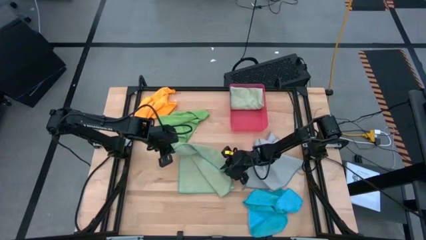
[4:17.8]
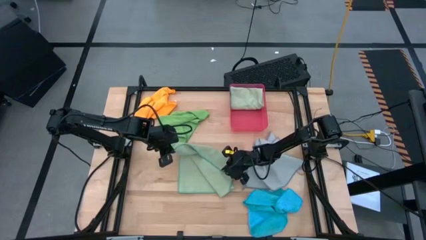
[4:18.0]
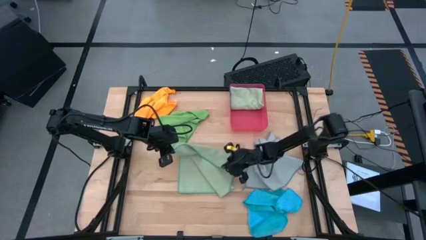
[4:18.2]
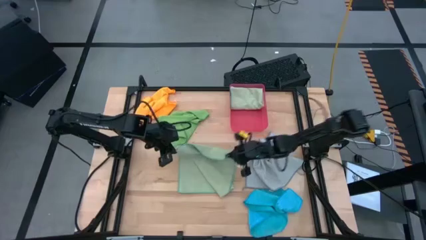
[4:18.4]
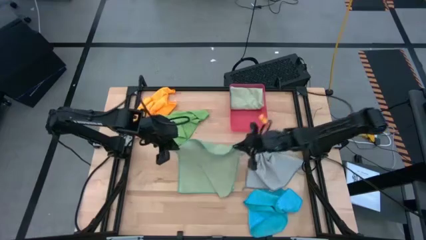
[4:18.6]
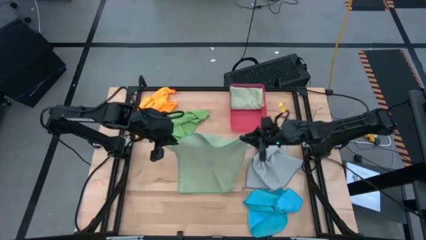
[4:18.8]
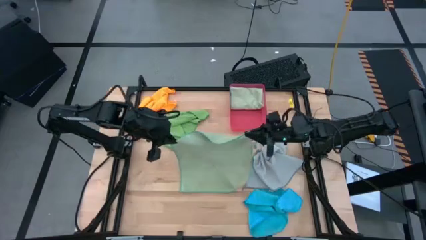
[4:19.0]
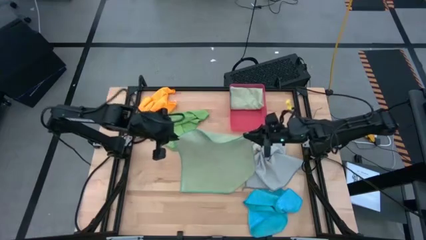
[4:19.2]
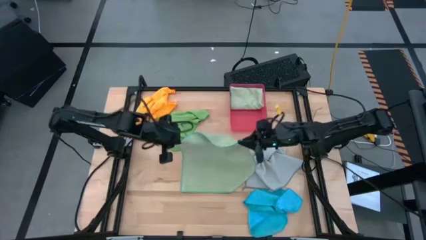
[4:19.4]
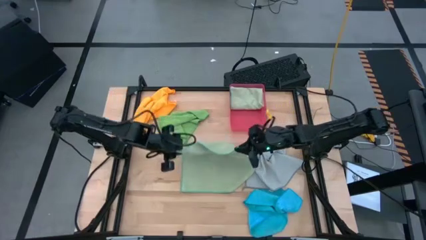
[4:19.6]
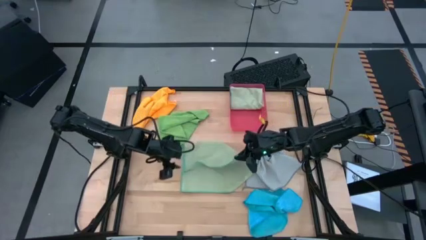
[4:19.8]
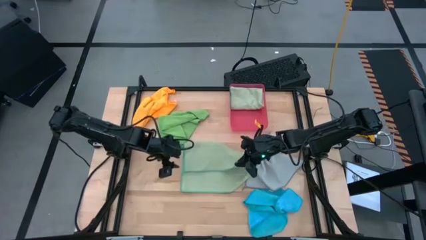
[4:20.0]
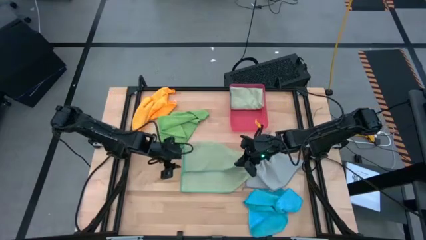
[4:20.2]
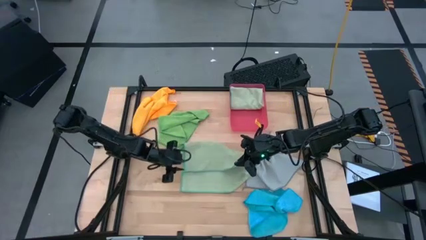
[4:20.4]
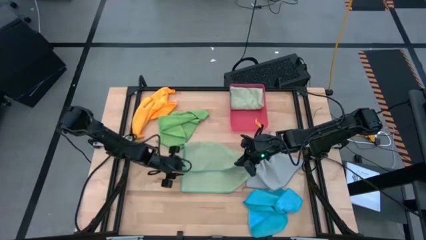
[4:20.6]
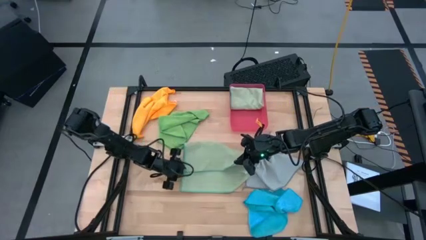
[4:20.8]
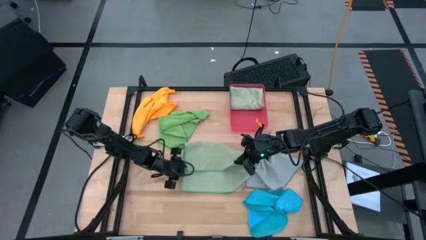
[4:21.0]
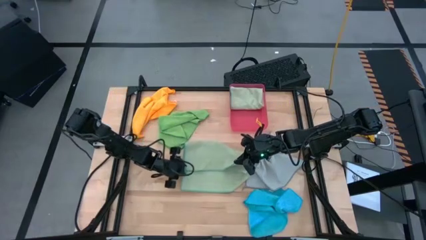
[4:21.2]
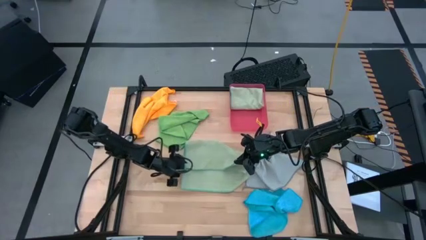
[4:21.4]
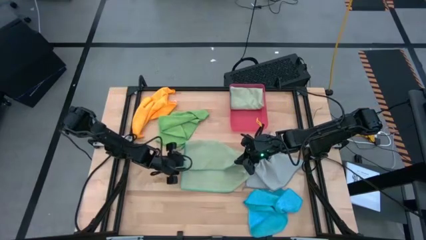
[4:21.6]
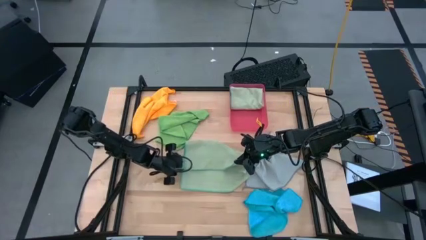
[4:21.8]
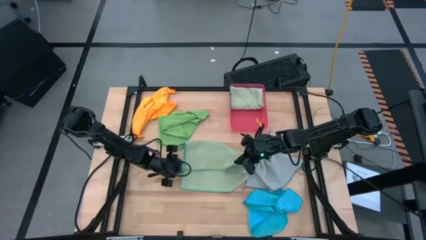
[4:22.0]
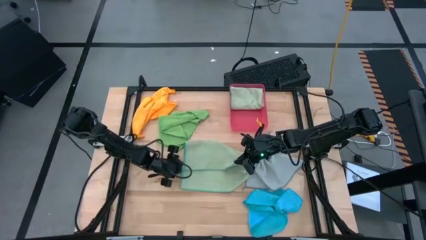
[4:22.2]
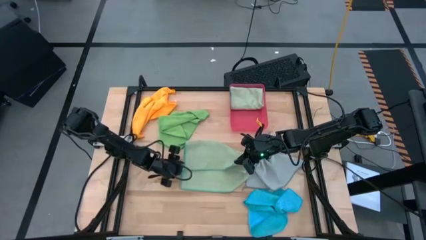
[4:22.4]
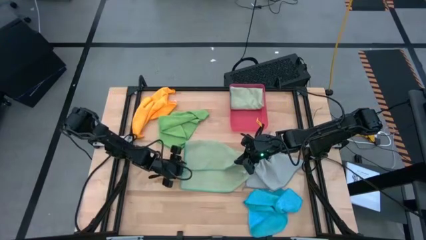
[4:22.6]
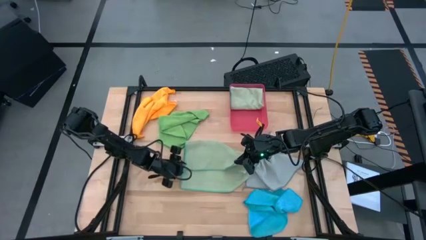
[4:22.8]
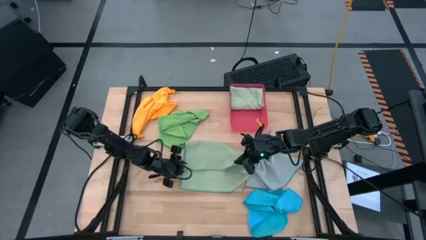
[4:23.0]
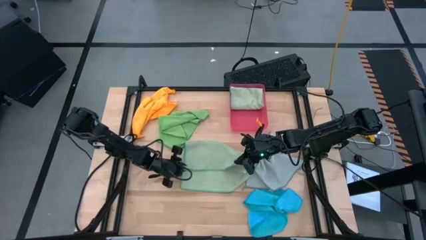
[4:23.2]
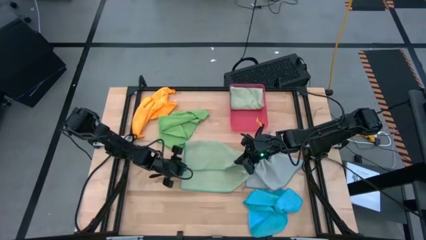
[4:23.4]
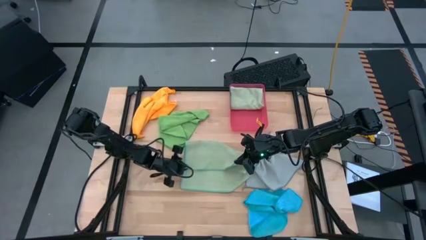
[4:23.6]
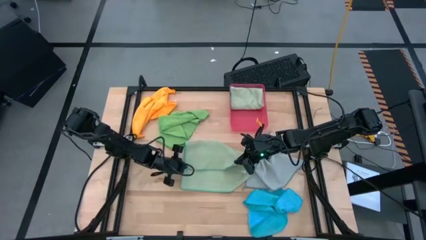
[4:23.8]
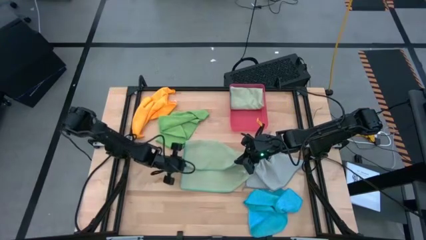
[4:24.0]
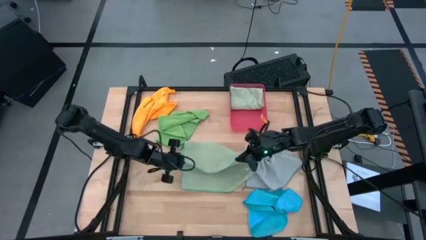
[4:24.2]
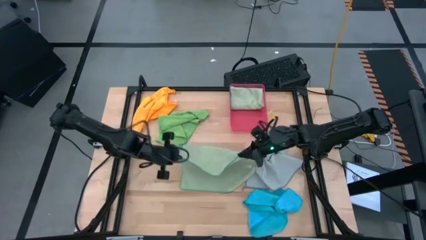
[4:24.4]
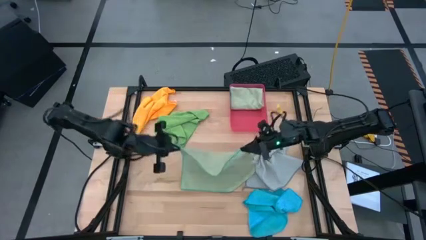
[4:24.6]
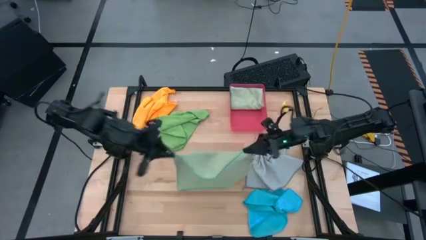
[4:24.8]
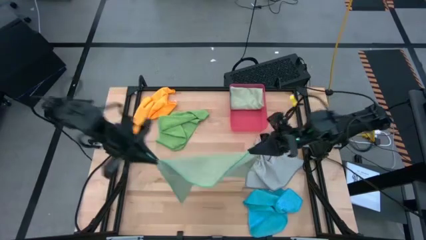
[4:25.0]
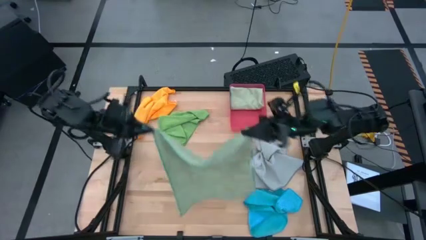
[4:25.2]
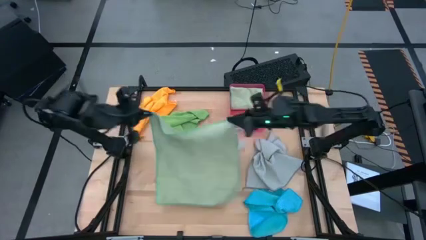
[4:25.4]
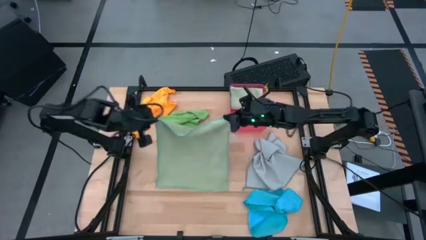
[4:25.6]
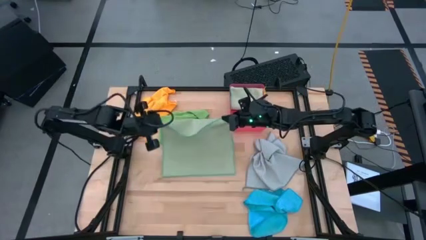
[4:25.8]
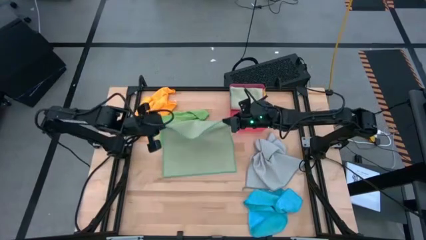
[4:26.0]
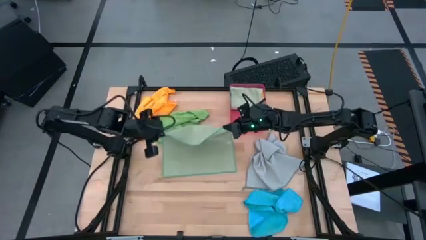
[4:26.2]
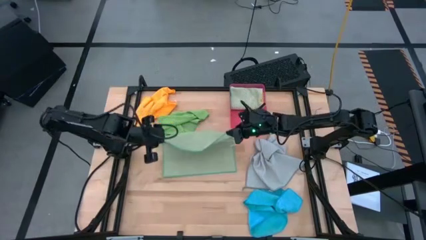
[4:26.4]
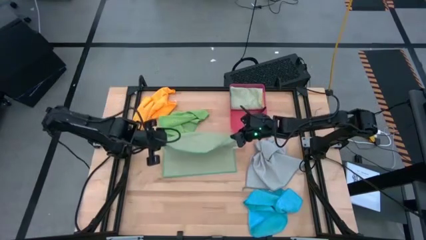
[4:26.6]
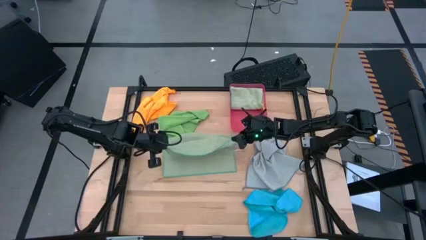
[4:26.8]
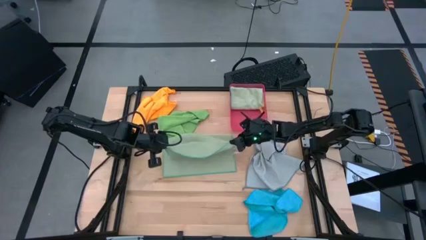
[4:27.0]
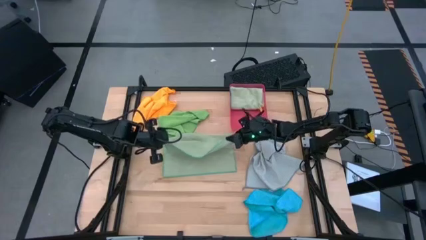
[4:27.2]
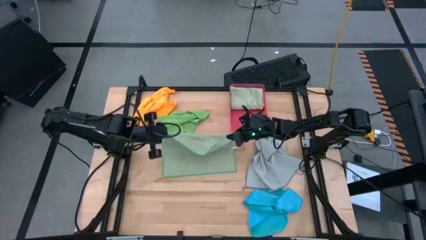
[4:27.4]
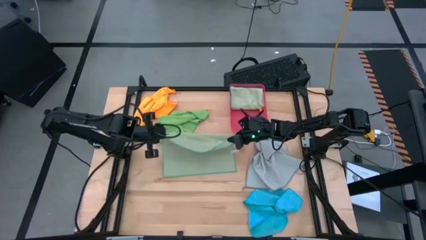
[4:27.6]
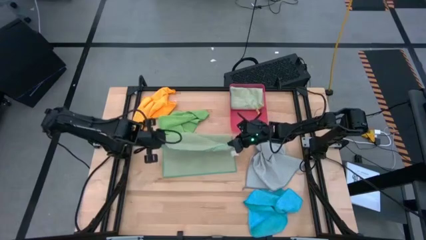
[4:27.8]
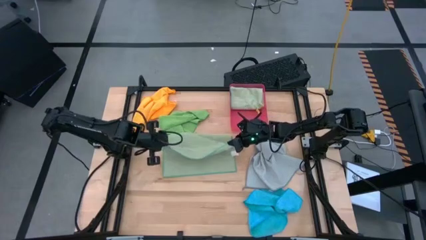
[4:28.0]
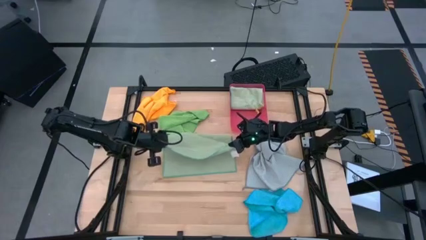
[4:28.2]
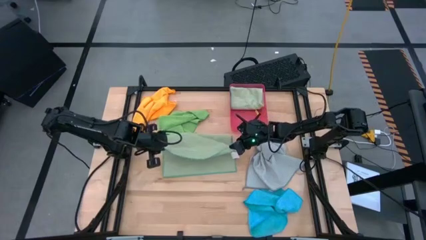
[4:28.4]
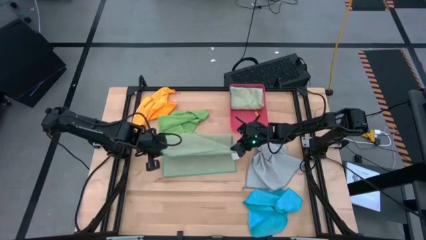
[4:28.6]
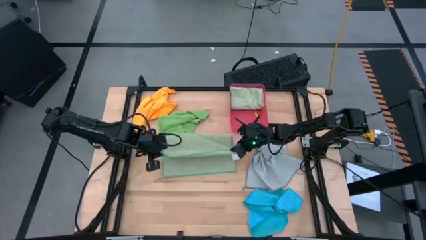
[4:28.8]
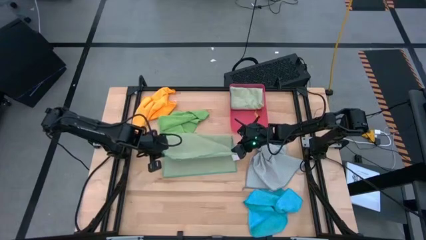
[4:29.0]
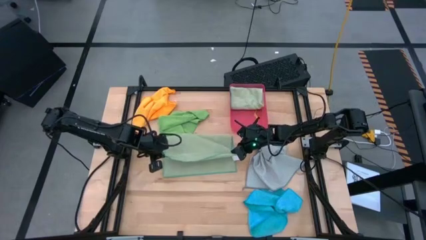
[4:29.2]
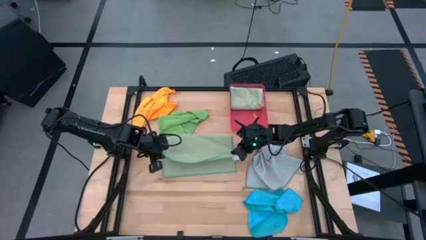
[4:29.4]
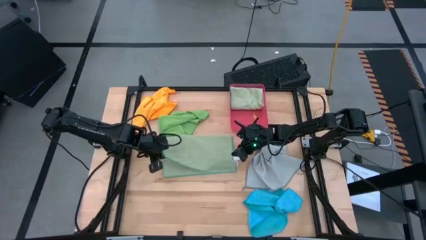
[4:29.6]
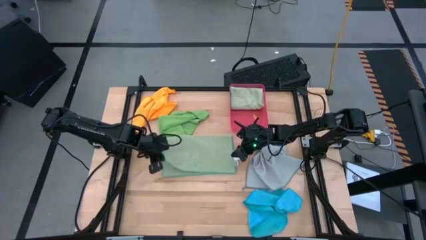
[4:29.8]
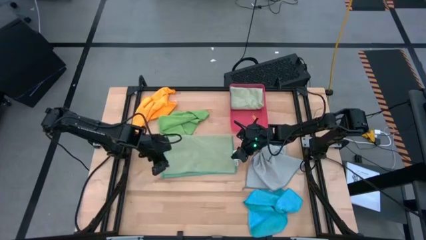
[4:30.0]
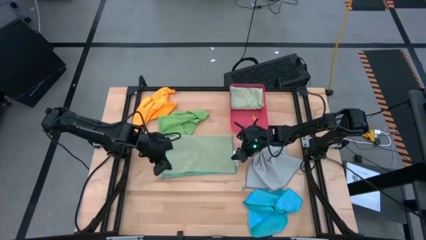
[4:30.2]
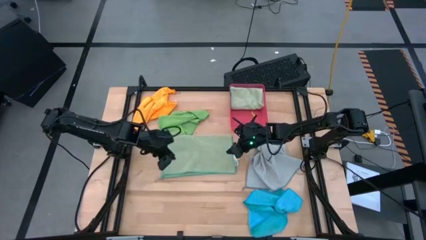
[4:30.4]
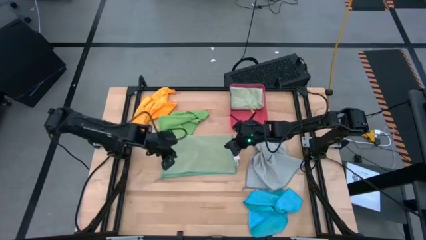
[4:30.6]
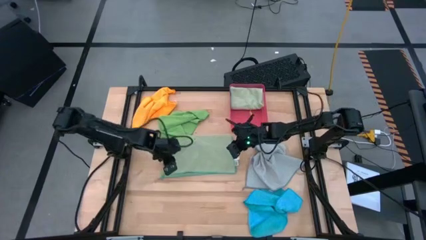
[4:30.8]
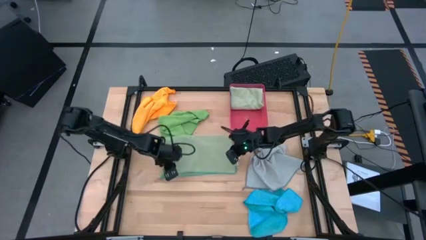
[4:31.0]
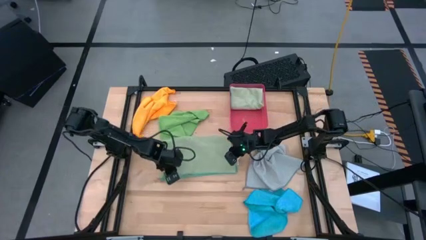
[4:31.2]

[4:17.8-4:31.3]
Task: Fold microfiber towels
Fold the light green microfiber cloth

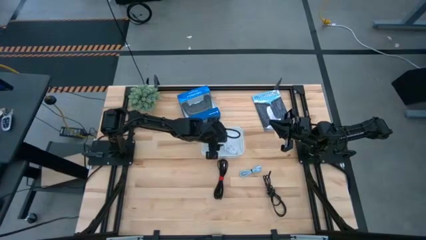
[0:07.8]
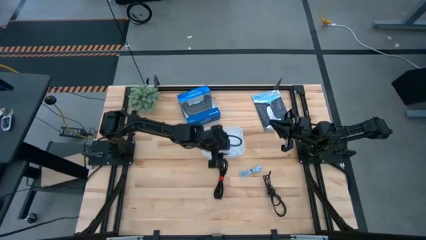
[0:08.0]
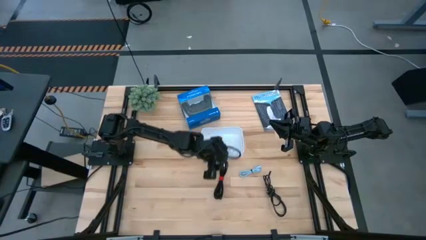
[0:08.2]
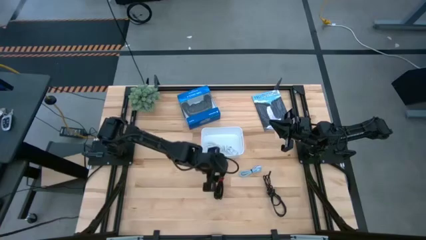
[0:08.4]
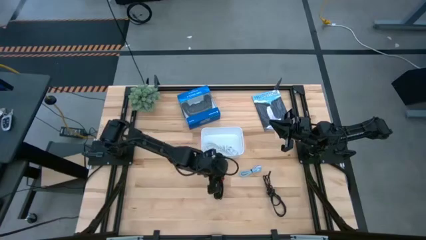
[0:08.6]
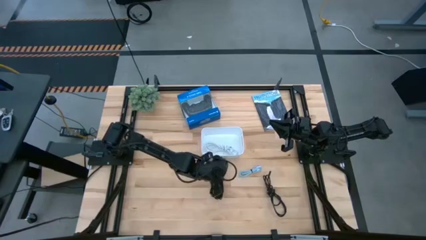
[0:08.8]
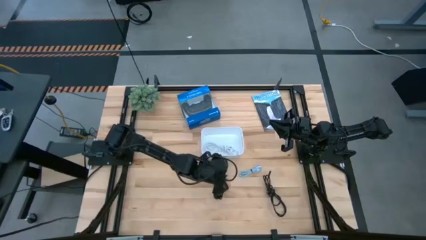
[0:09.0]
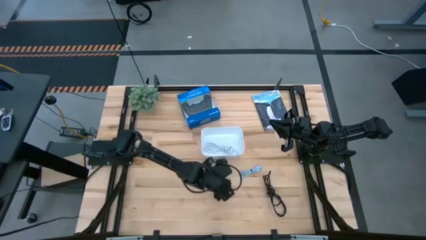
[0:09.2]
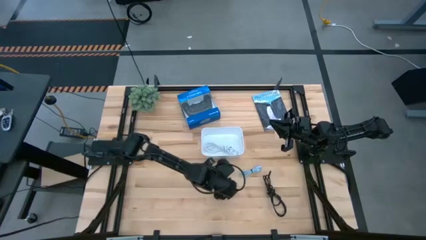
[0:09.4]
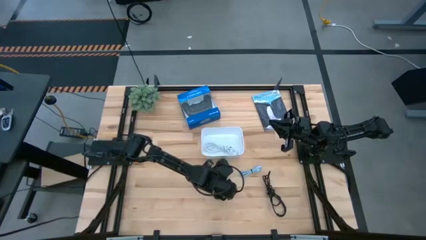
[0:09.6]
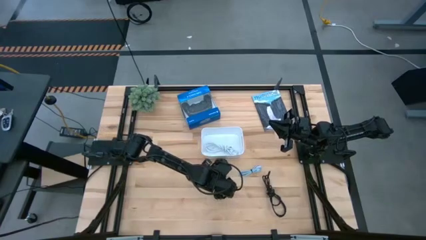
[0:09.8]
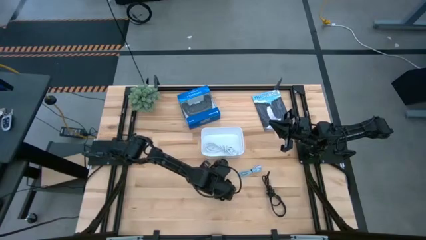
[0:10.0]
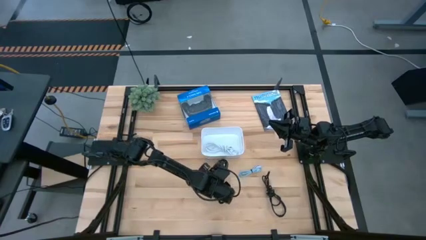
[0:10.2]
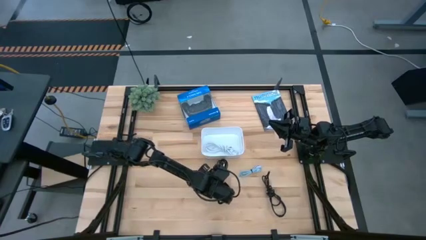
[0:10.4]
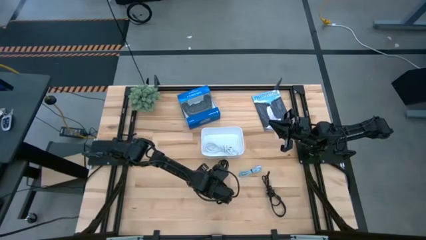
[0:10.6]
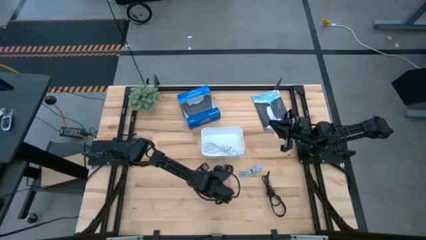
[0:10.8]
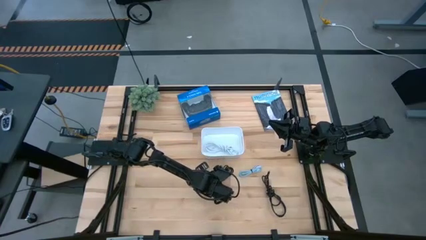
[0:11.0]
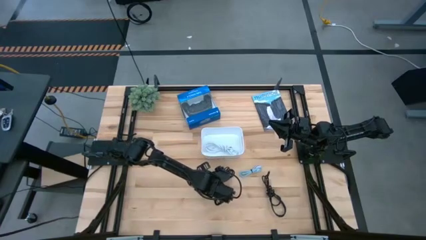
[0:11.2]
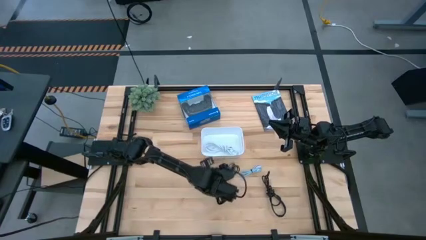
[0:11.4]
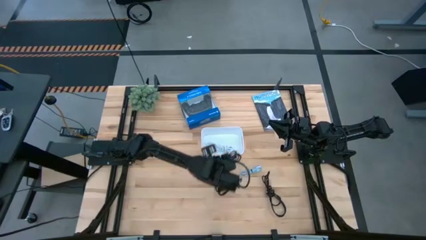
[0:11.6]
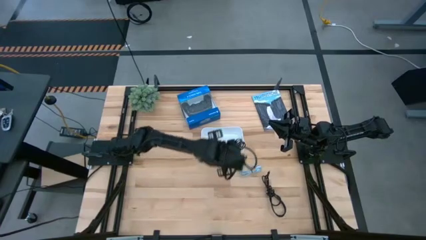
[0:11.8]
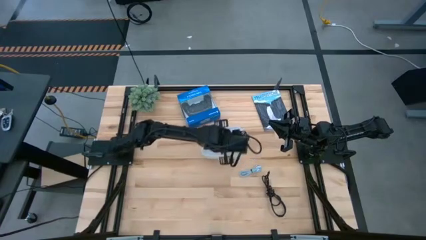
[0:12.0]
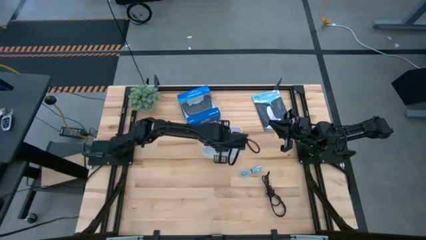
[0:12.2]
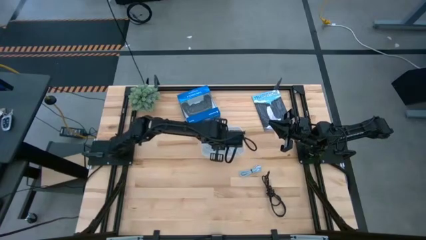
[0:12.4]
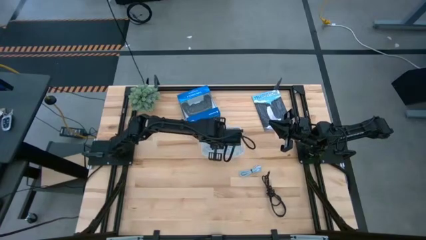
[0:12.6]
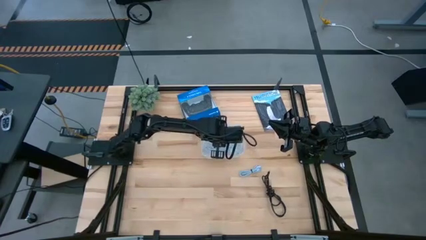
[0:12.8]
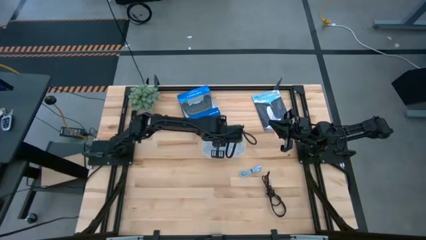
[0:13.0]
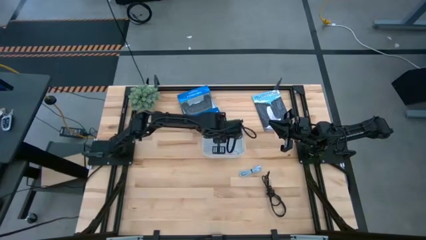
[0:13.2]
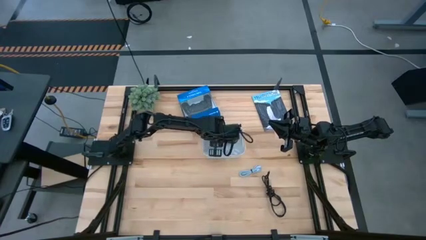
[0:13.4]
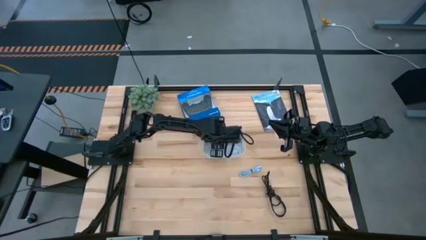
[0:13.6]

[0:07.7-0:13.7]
Task: Pick and place USB-C Cables
Put the left black charger cable into the white bin
